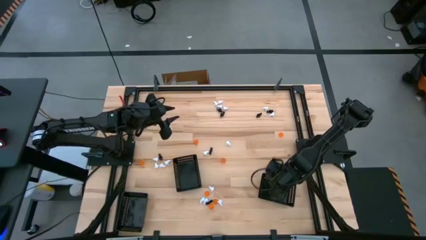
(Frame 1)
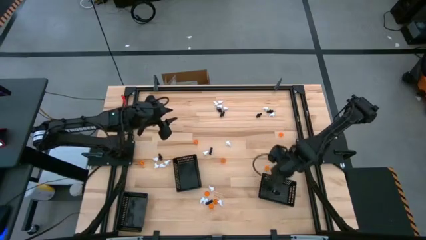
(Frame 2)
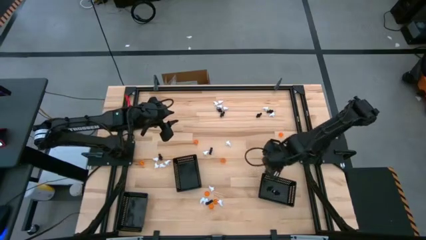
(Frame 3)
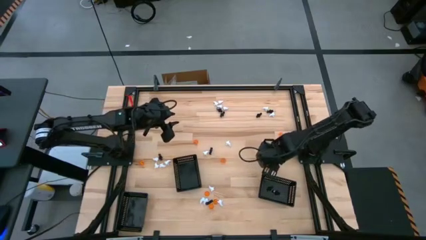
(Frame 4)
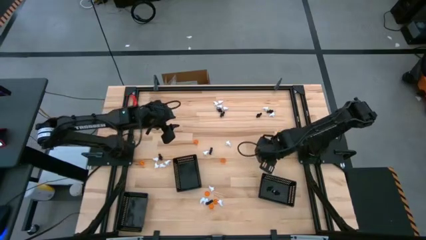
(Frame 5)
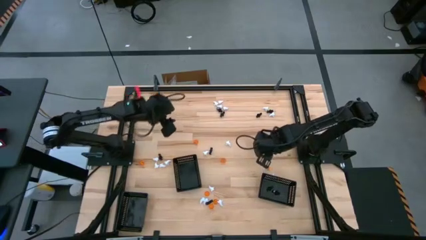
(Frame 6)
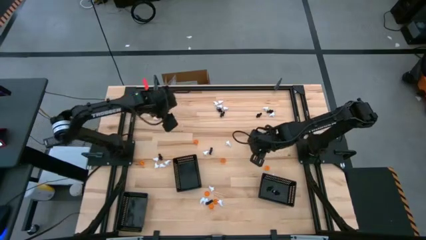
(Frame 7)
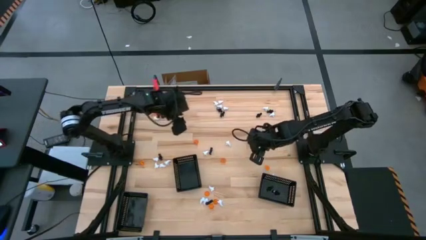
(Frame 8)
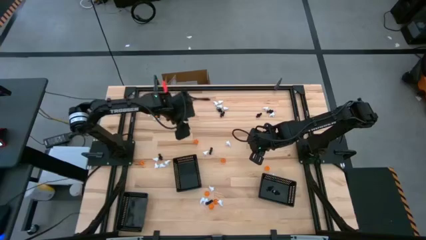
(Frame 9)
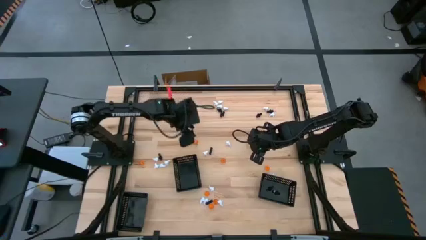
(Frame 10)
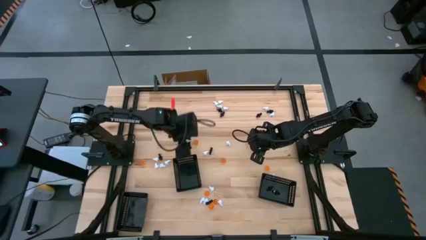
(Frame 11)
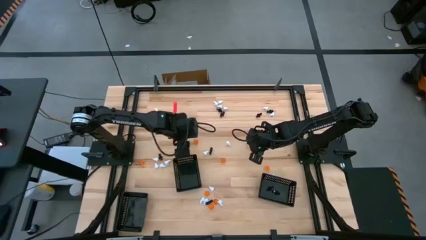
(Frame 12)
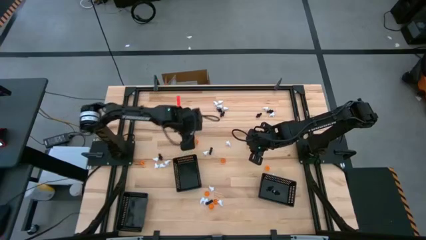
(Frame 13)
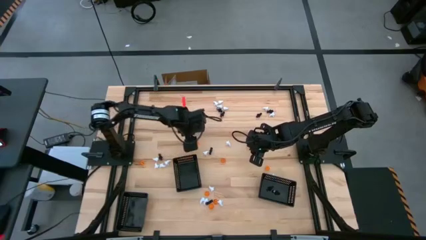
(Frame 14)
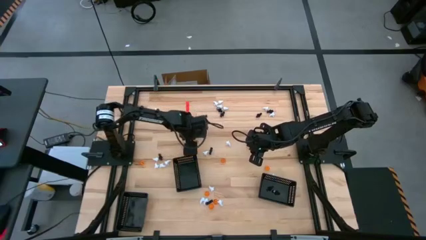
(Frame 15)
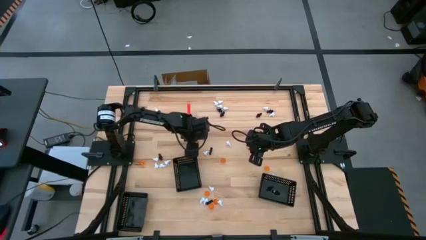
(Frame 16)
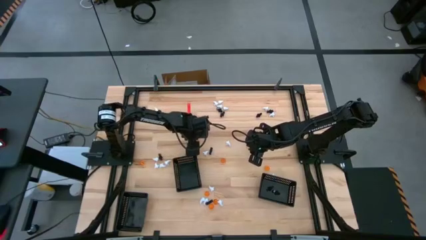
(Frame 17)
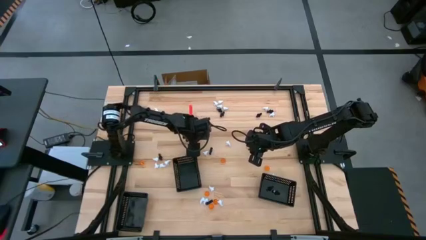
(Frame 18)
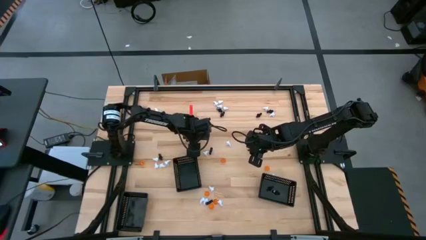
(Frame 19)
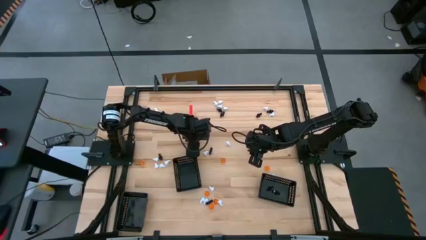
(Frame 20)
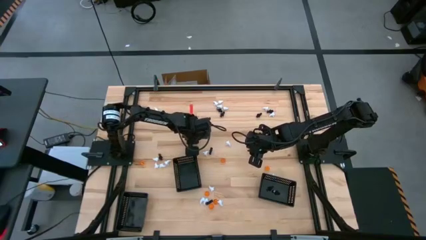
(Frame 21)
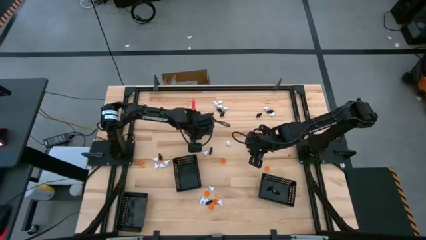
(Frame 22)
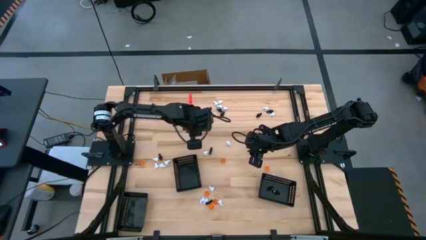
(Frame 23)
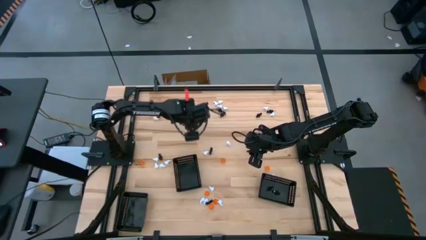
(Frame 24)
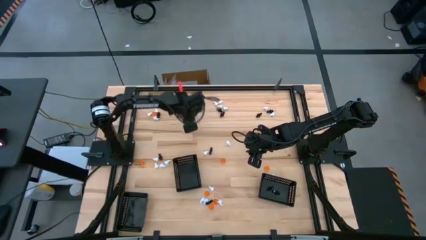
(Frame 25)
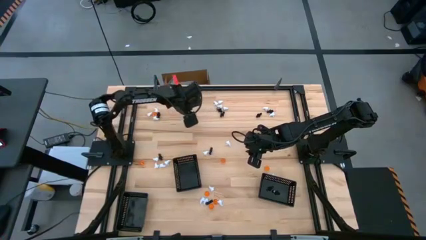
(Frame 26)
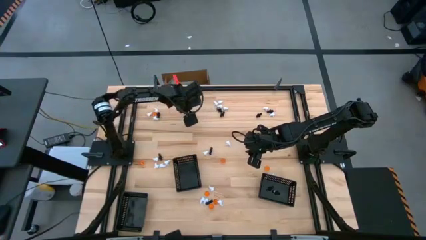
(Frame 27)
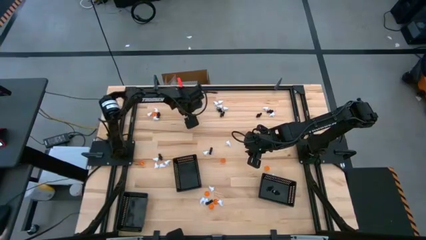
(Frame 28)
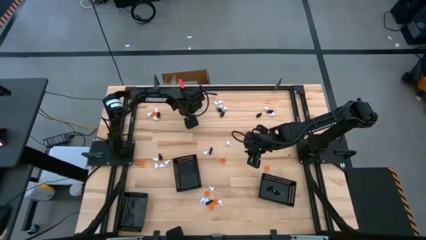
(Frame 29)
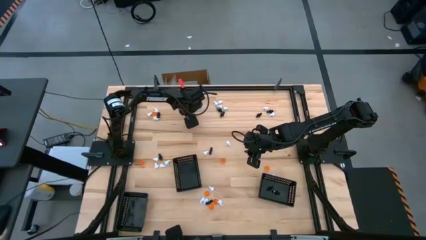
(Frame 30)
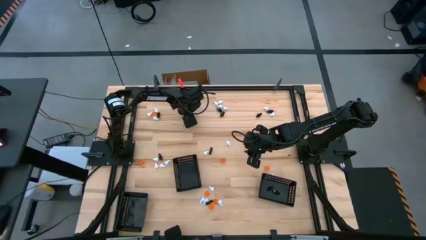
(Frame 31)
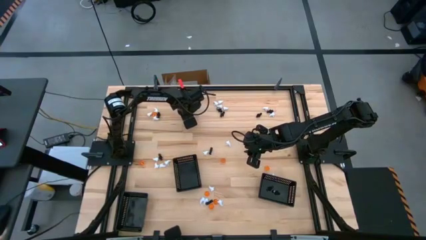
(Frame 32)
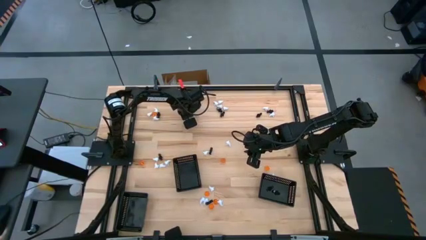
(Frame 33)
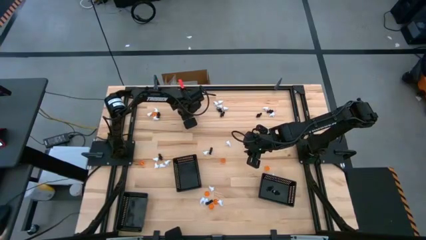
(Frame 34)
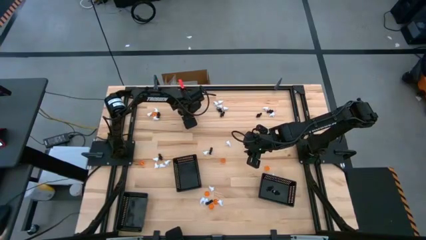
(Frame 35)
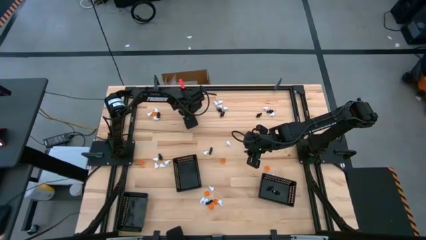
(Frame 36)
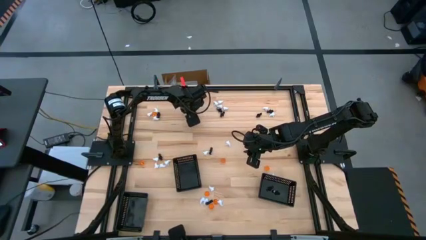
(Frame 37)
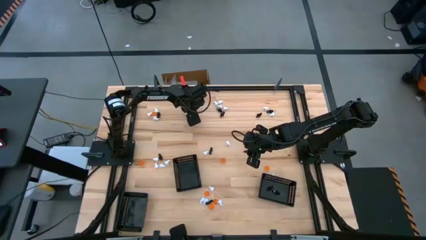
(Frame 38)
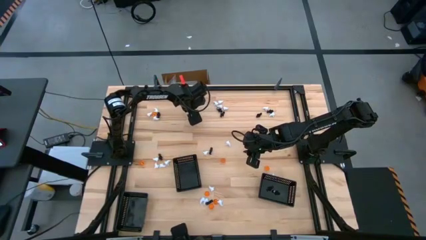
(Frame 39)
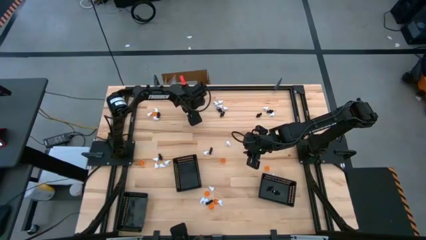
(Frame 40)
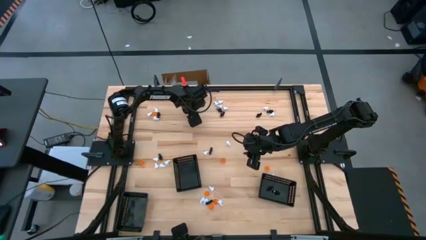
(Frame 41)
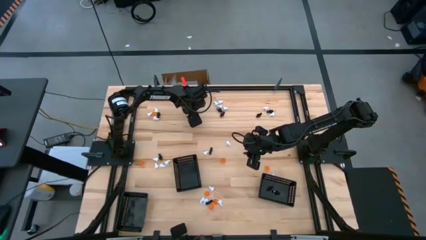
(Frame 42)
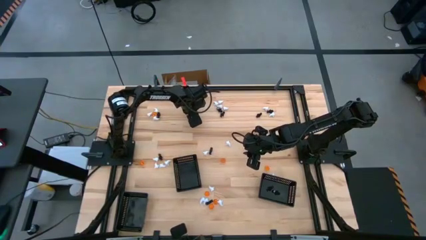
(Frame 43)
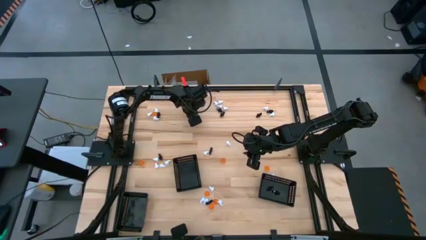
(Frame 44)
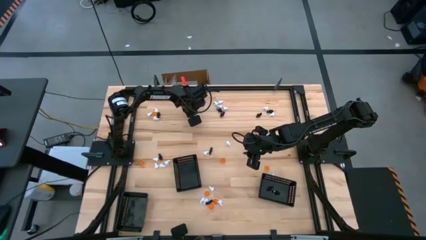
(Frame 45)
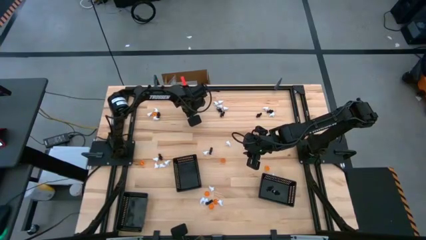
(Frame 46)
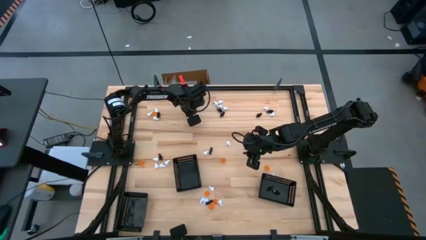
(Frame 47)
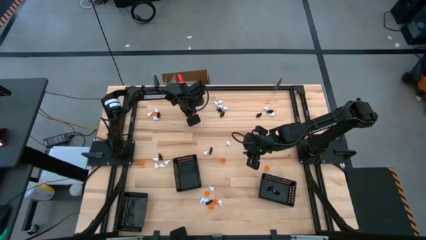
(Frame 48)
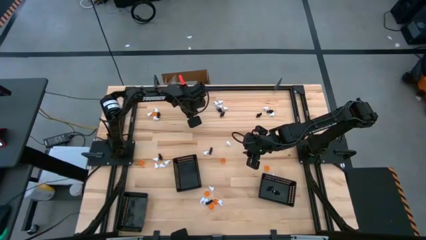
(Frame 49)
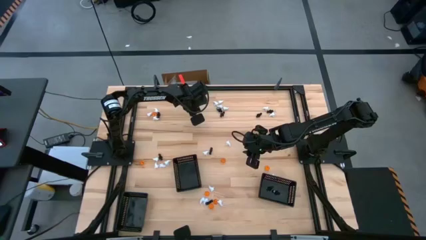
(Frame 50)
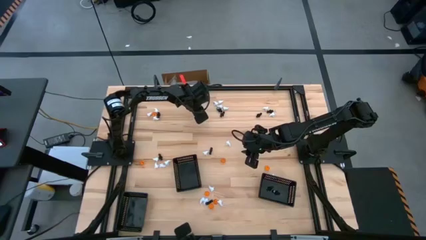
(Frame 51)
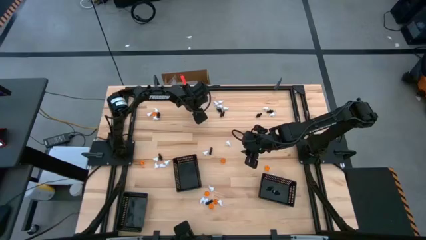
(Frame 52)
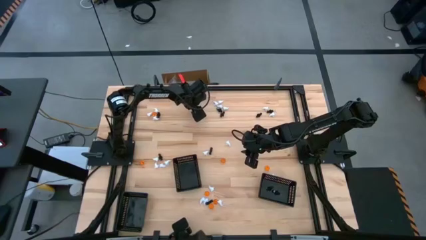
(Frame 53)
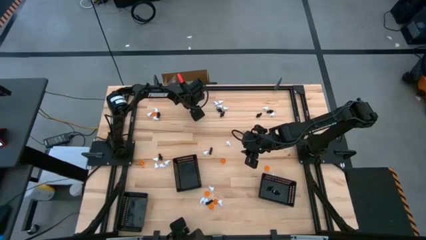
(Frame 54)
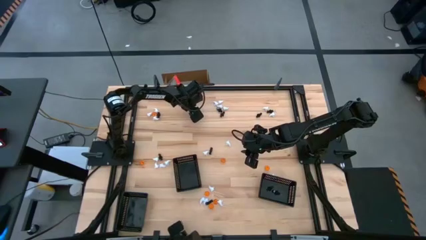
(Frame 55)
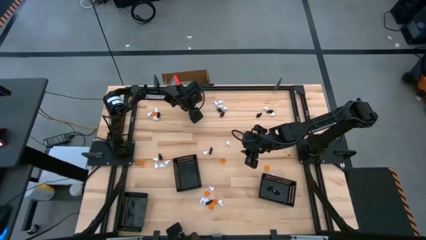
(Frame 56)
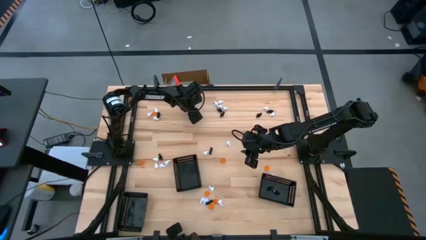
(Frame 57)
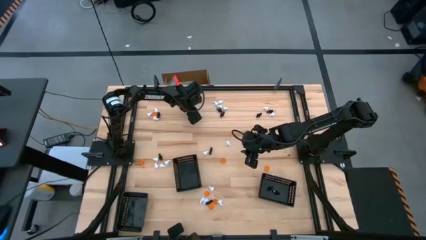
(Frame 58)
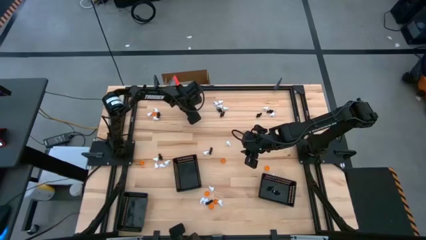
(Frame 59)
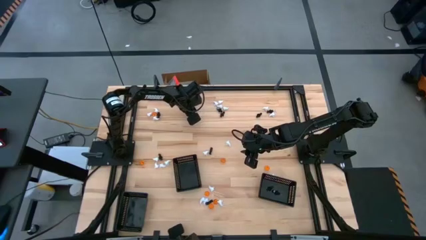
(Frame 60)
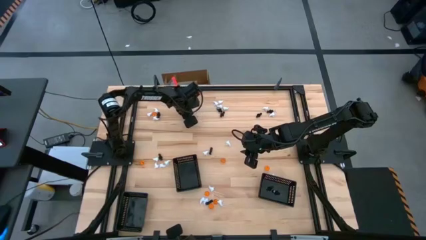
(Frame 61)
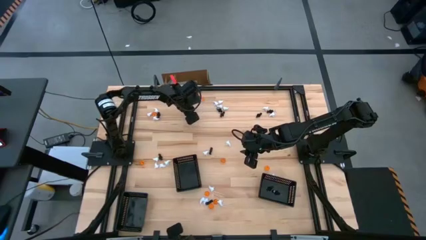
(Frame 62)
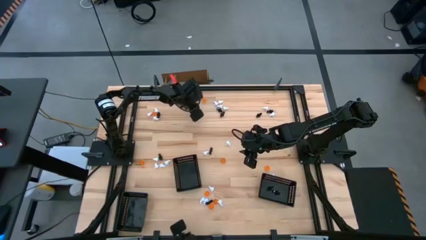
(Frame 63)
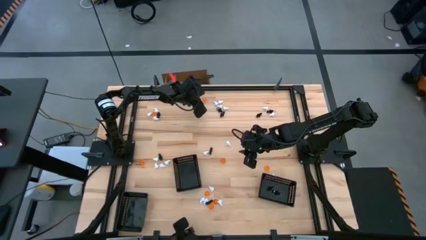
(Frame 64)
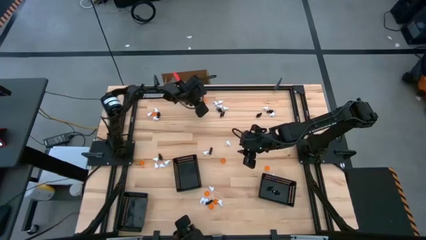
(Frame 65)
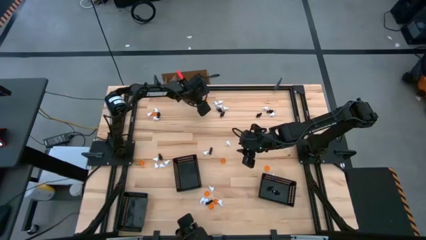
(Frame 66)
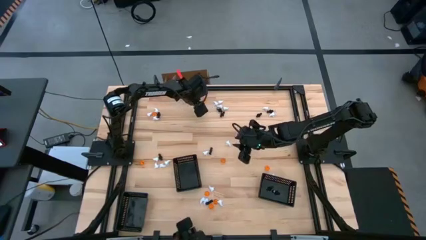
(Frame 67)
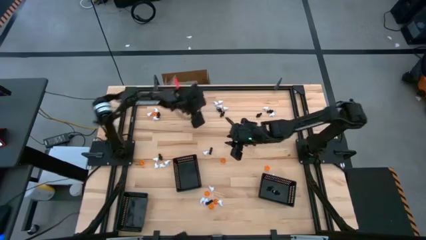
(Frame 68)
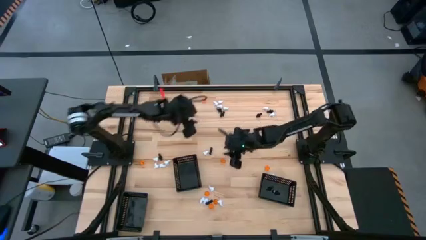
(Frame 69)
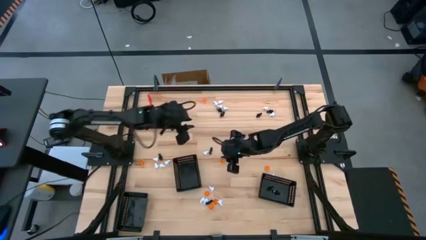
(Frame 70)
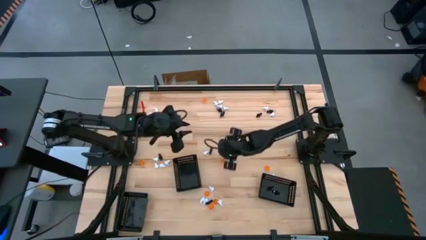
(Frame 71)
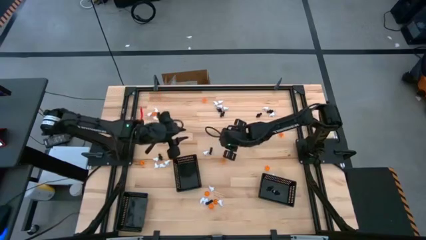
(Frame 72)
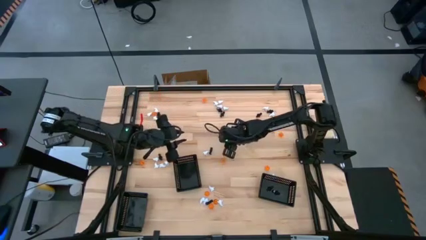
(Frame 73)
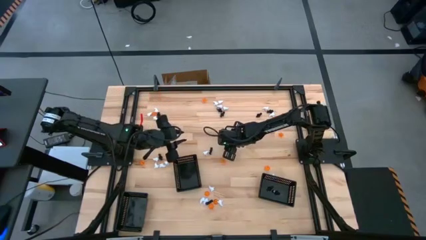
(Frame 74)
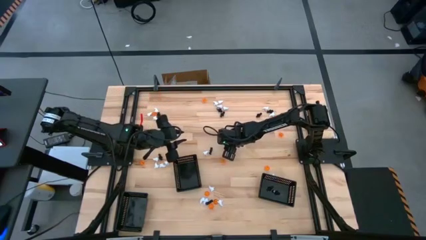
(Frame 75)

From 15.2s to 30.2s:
Task: Sort Halloween decoration
Put the orange pumpkin toy into the left black basket

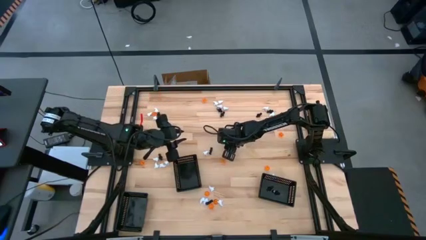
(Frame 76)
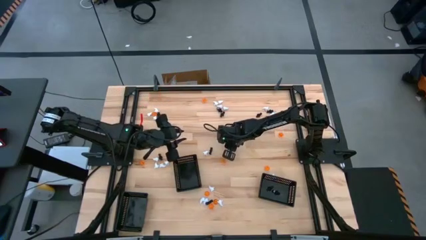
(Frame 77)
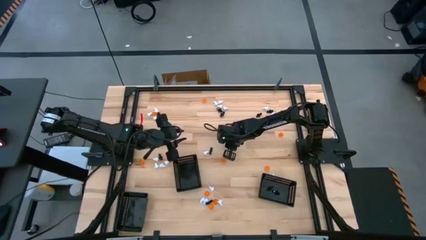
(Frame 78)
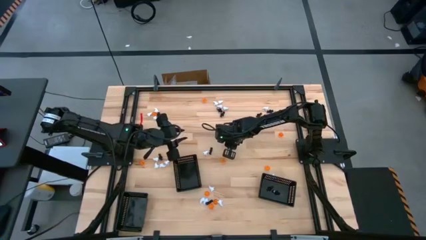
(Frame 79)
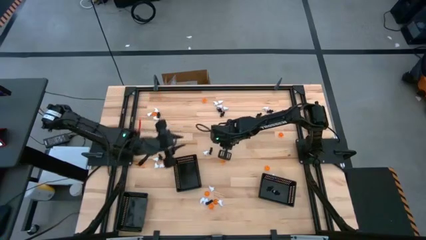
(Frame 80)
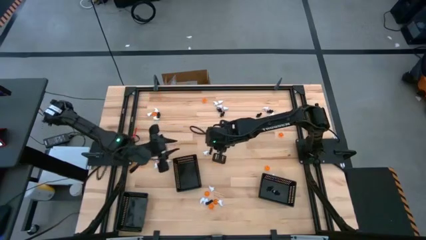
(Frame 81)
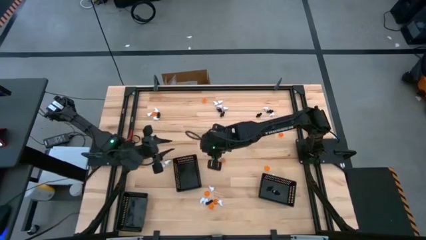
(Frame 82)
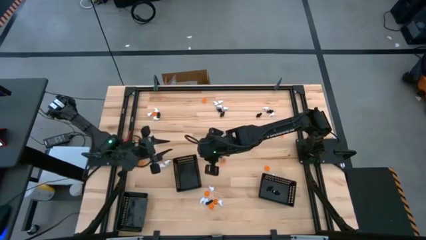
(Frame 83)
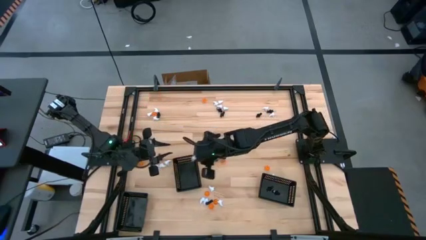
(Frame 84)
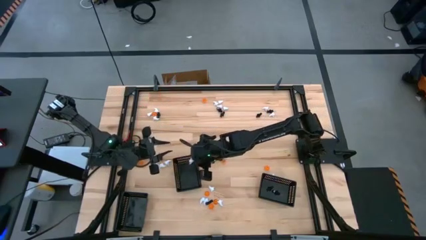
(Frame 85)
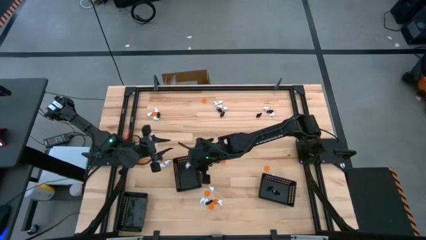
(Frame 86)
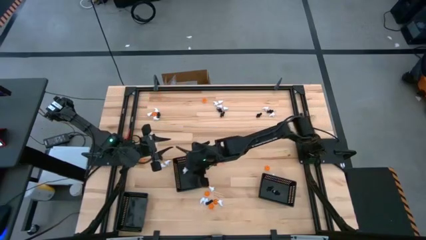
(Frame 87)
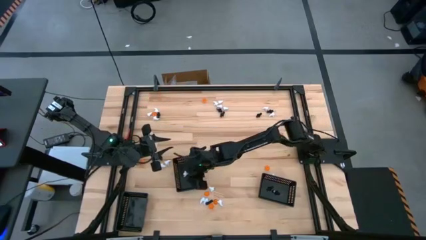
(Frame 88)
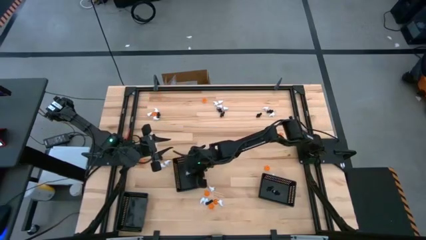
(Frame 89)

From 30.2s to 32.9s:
Put the white ghost toy into the middle black basket
